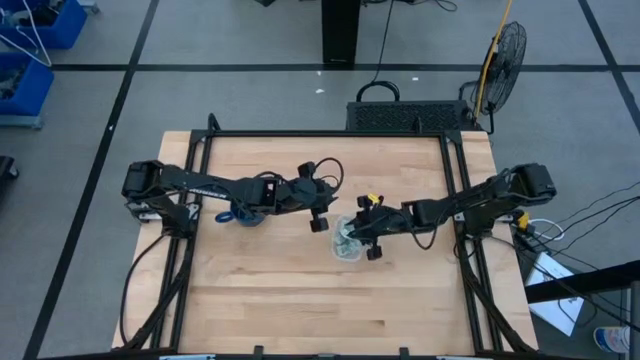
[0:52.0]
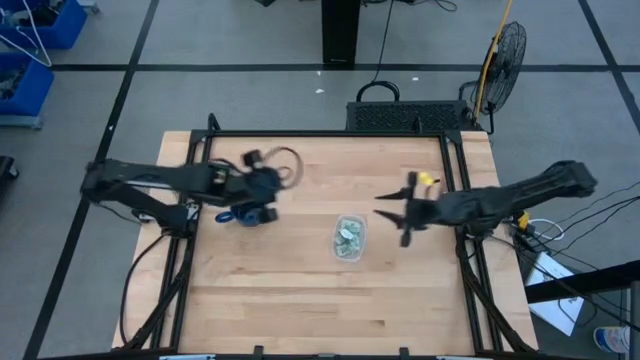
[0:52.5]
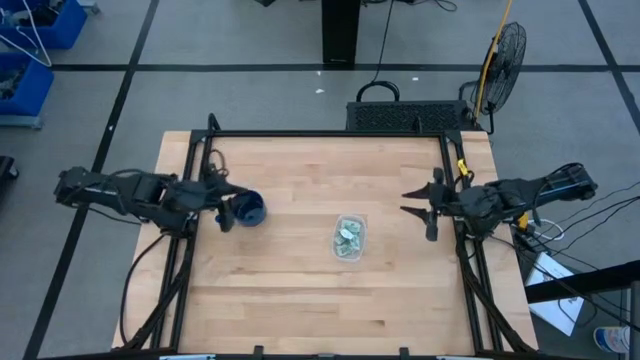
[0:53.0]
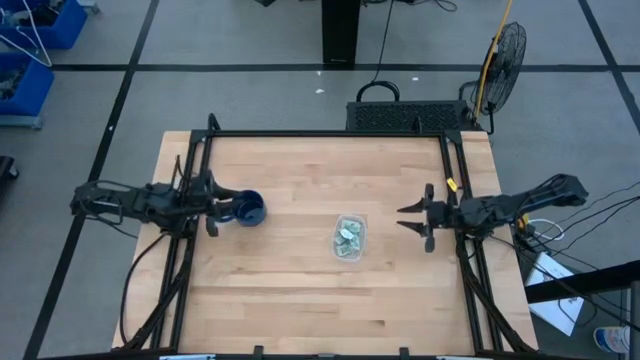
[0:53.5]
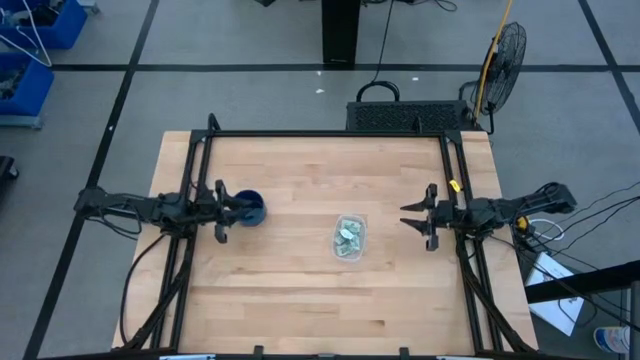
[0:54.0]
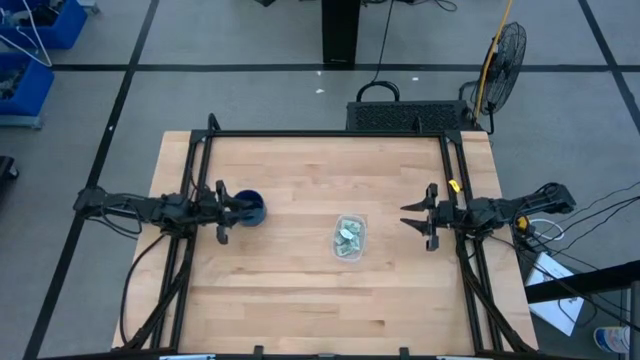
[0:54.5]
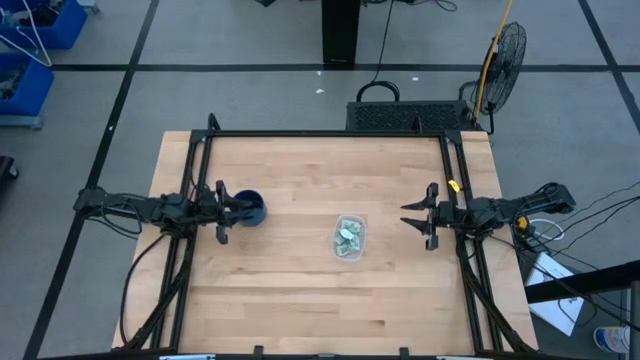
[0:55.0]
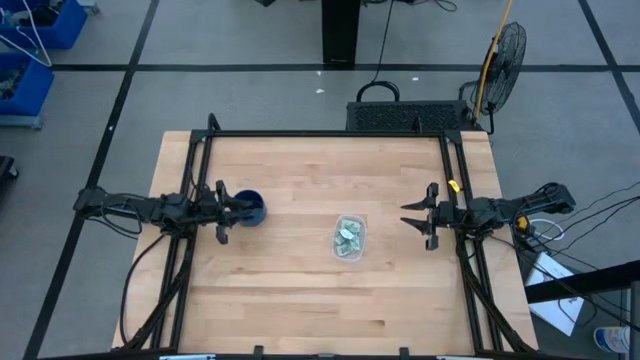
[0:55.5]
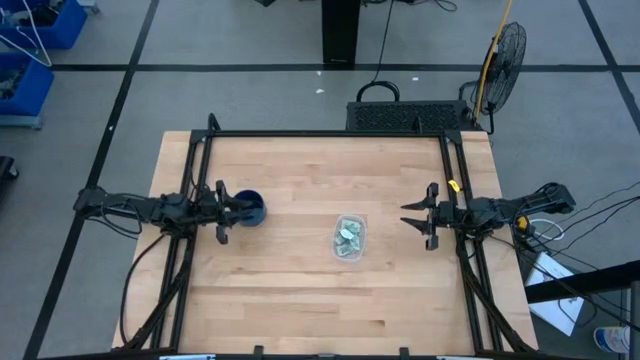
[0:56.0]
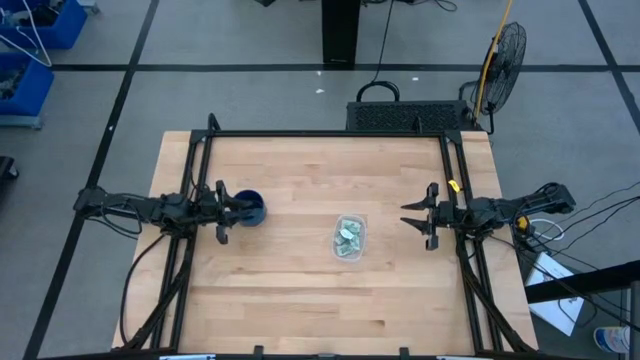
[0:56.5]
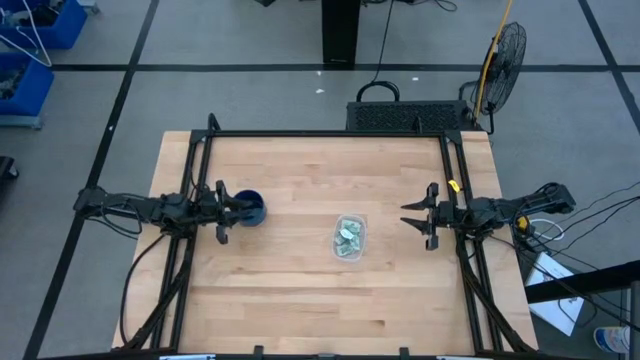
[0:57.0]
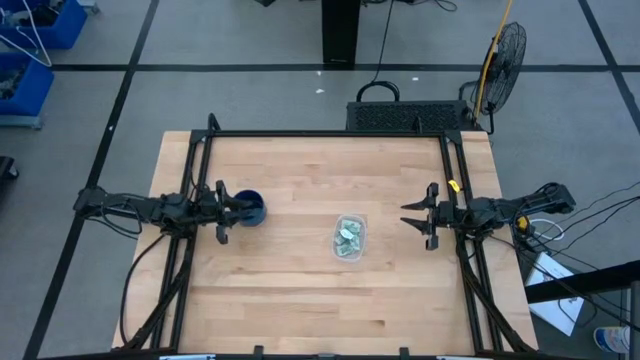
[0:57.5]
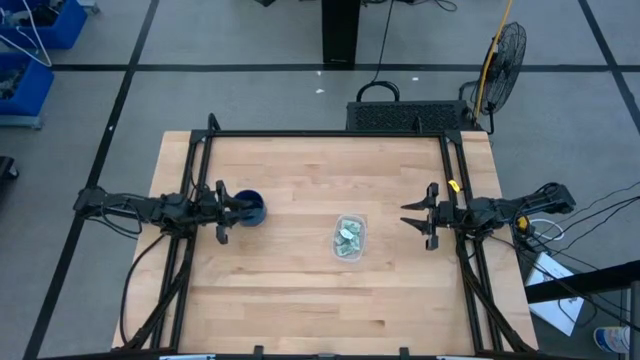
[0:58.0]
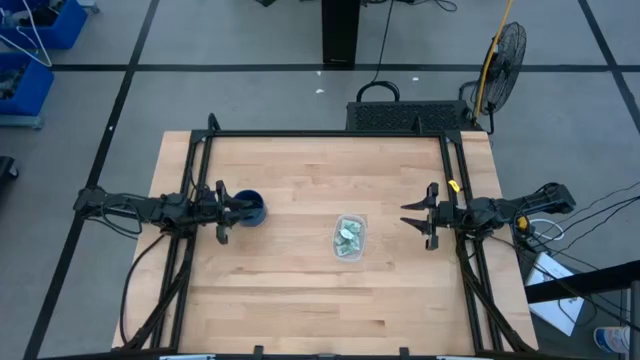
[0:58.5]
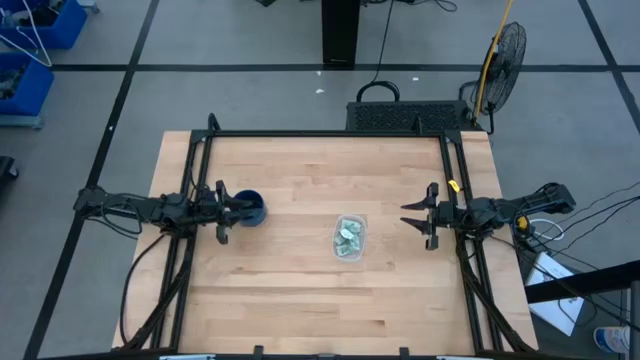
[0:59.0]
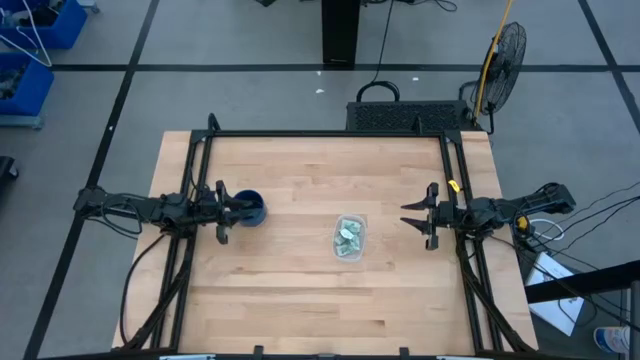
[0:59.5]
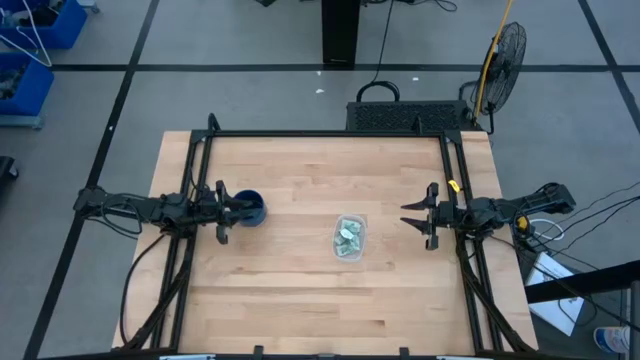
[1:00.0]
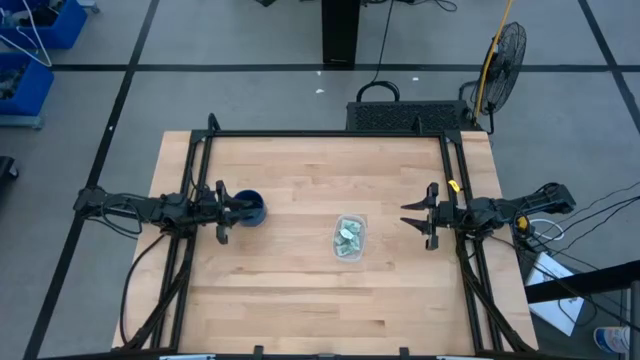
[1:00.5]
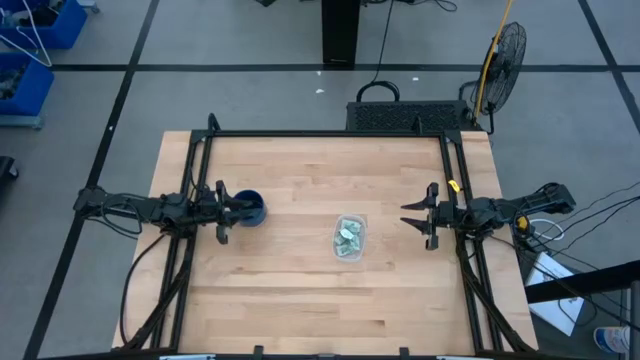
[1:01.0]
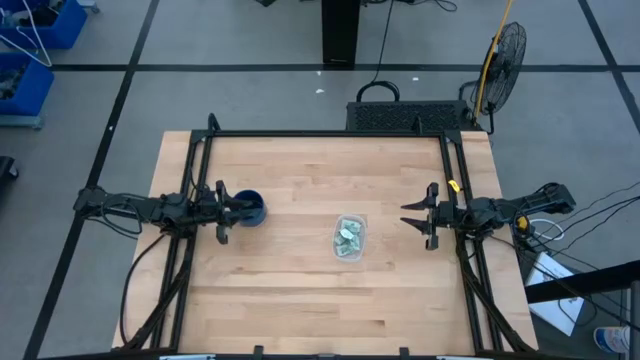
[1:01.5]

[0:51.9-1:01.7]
Task: Pick and place Stevia / Truvia into bins
Return to Home Position

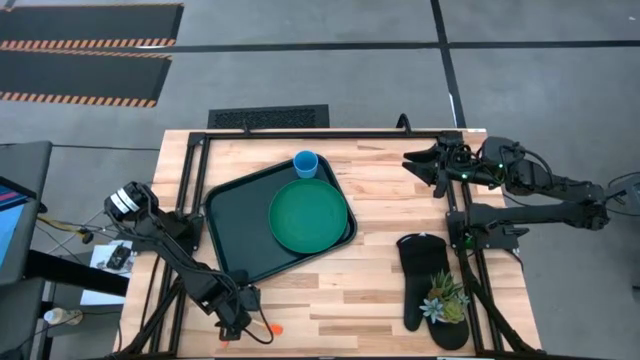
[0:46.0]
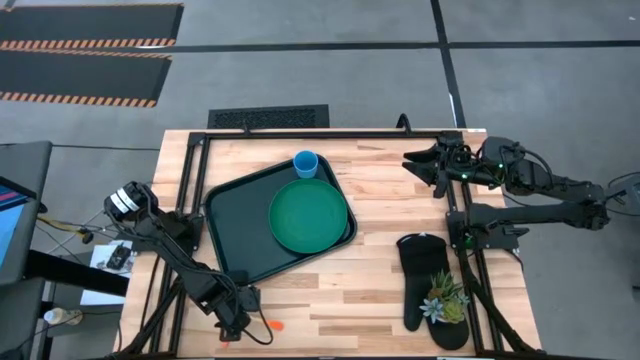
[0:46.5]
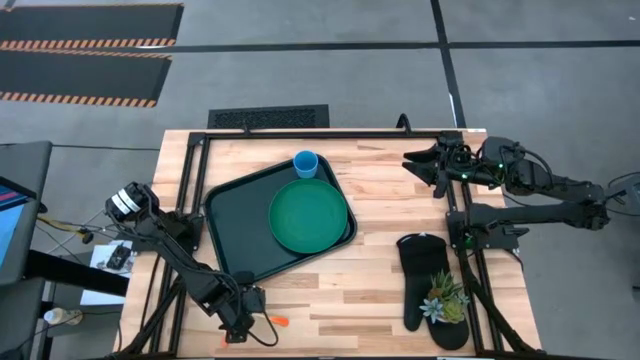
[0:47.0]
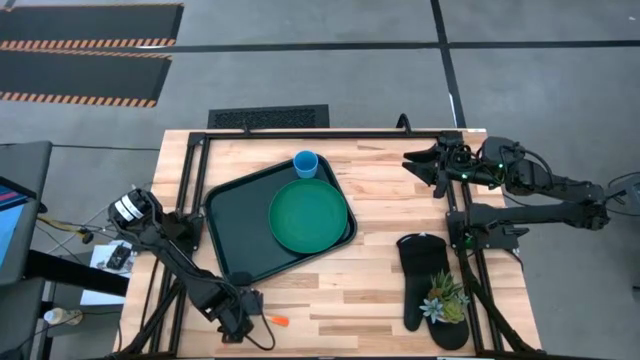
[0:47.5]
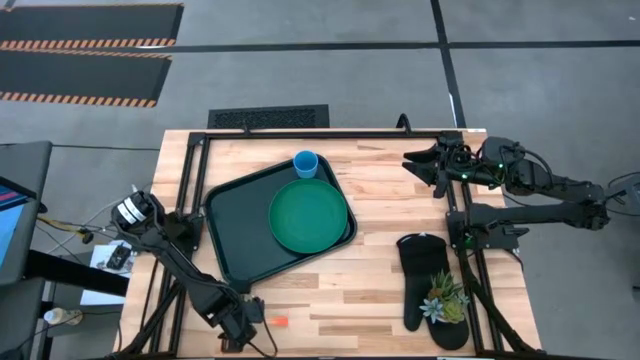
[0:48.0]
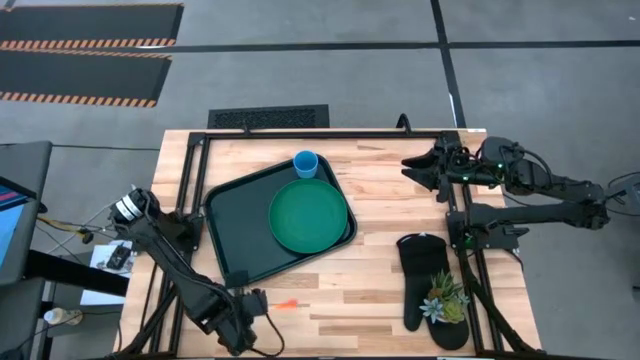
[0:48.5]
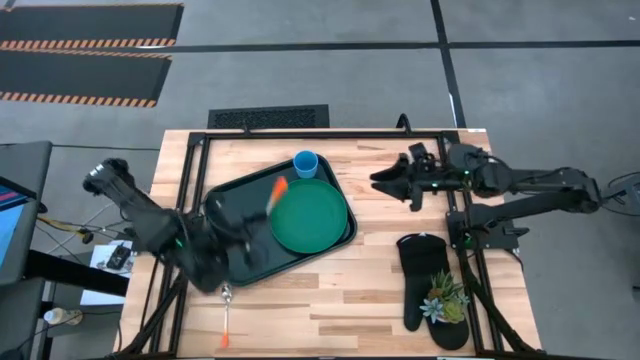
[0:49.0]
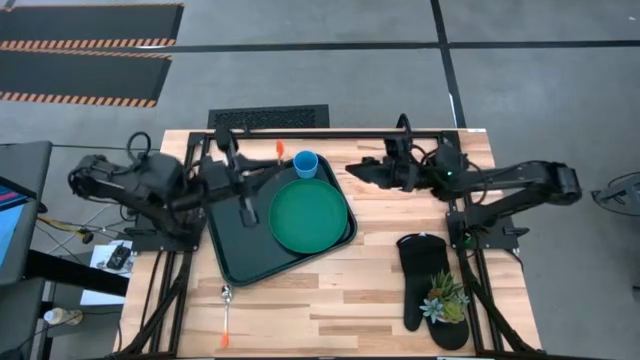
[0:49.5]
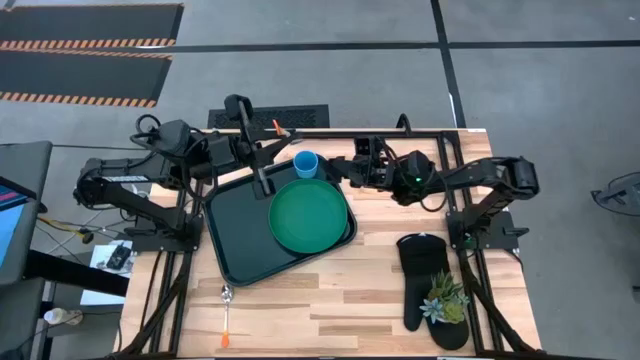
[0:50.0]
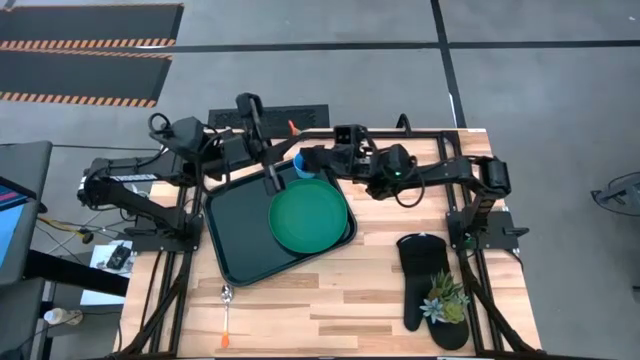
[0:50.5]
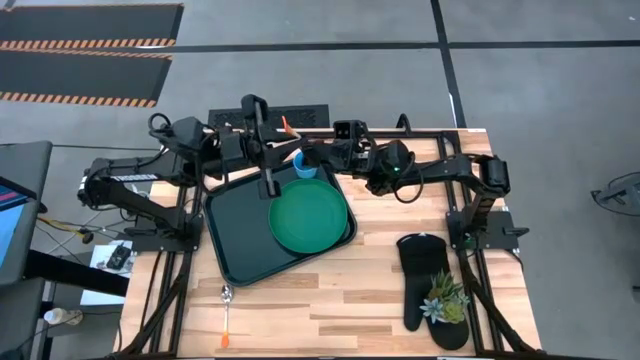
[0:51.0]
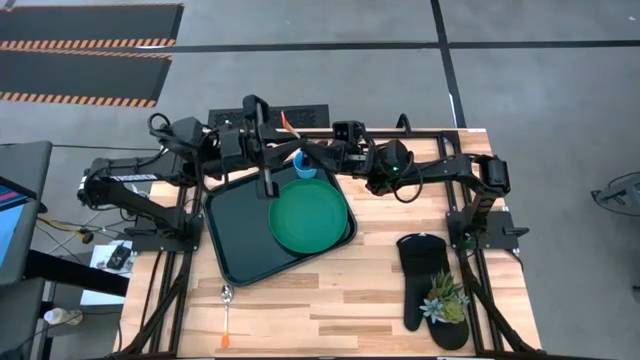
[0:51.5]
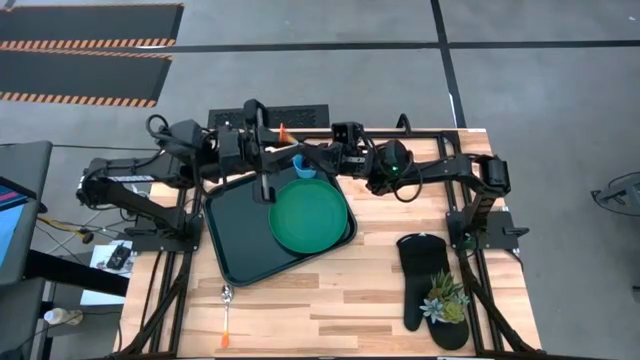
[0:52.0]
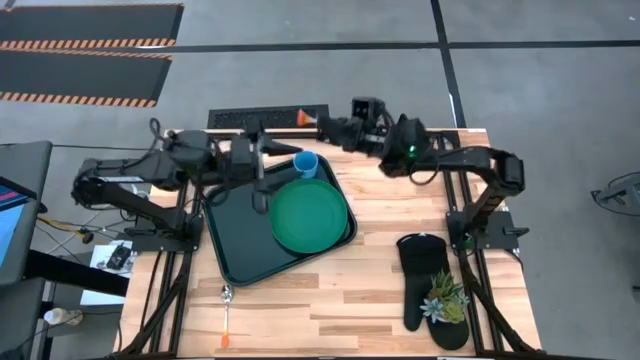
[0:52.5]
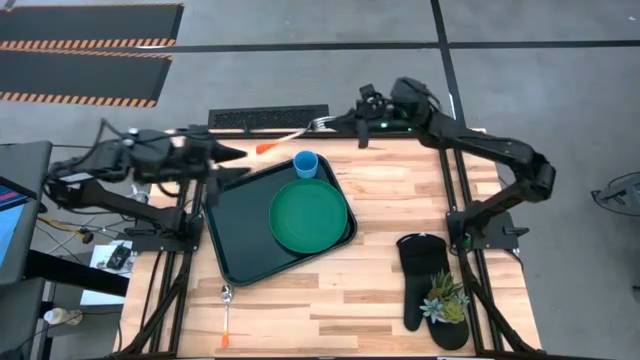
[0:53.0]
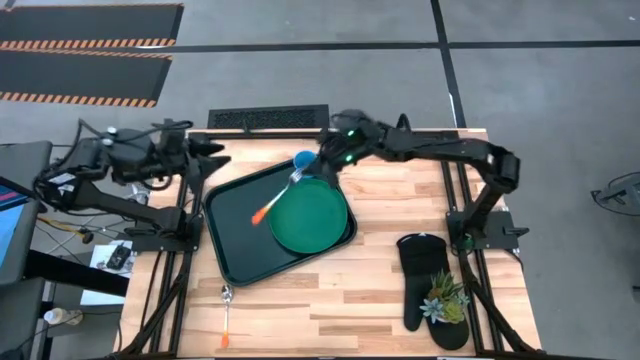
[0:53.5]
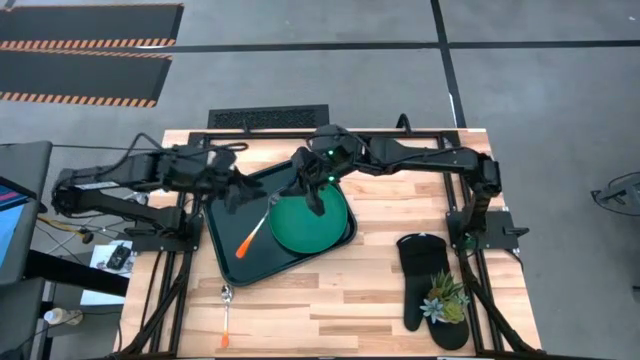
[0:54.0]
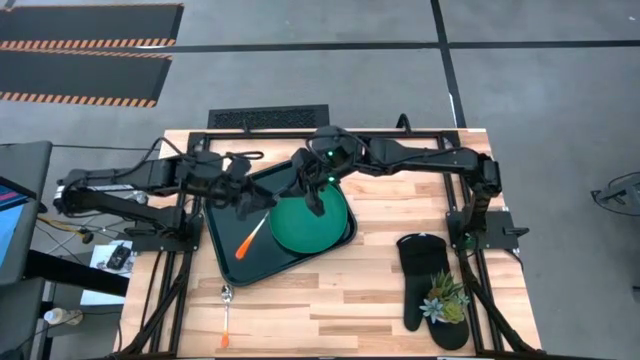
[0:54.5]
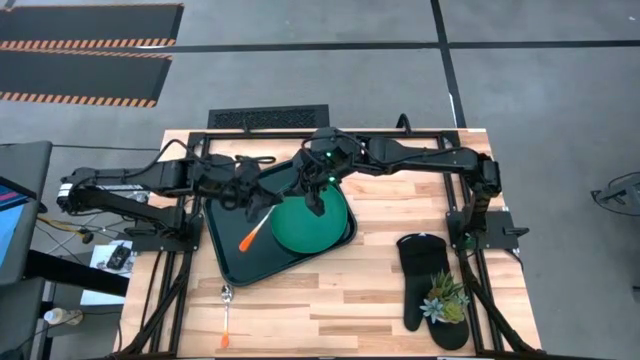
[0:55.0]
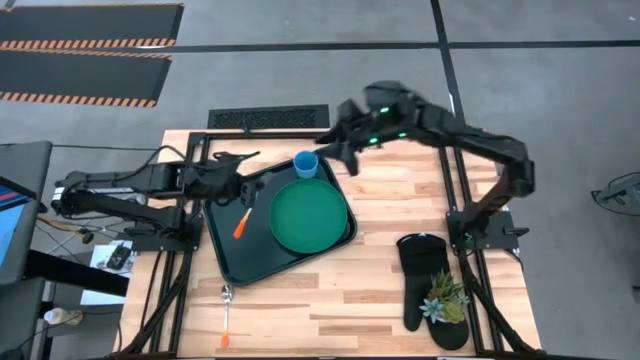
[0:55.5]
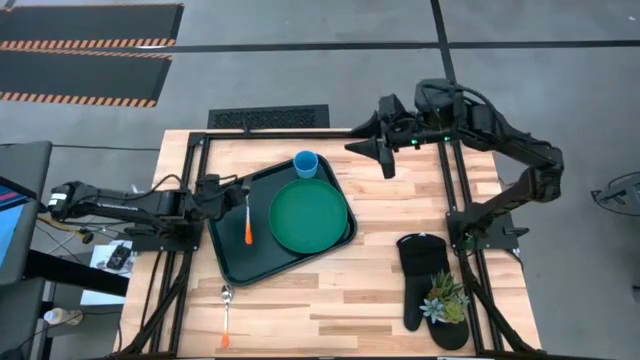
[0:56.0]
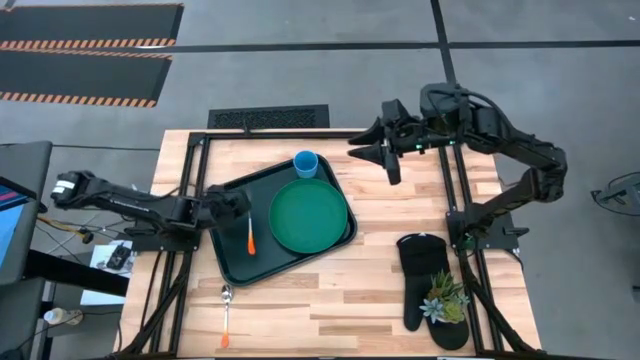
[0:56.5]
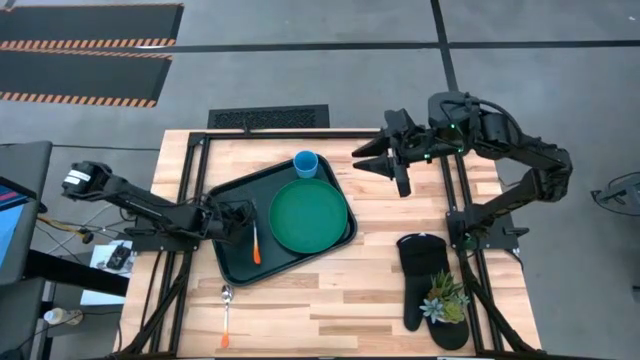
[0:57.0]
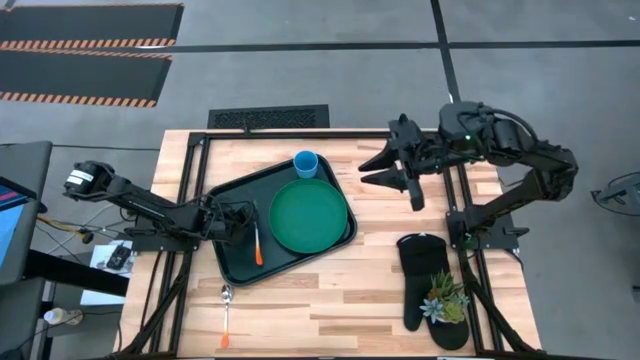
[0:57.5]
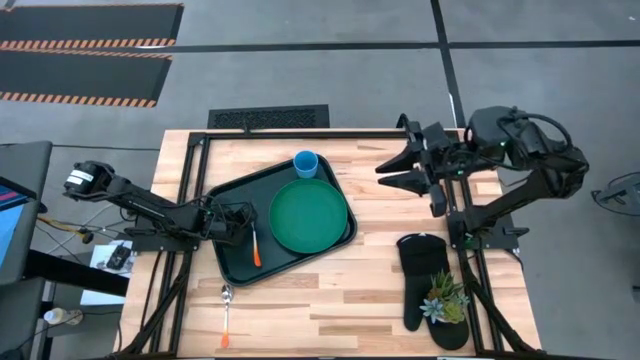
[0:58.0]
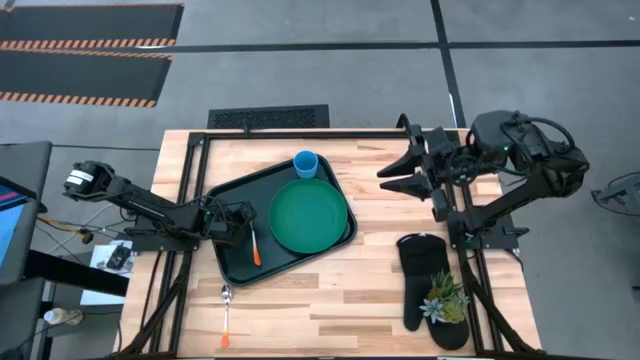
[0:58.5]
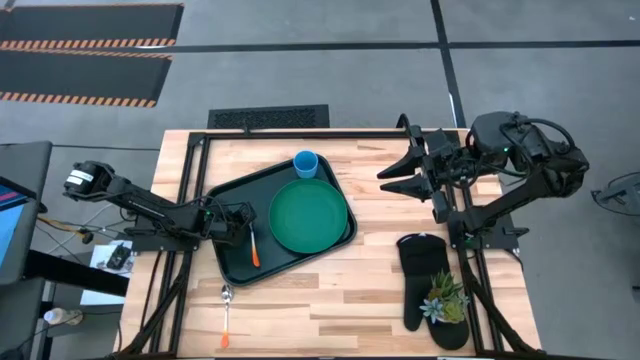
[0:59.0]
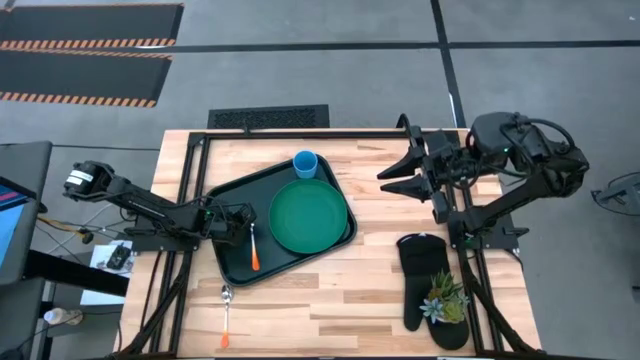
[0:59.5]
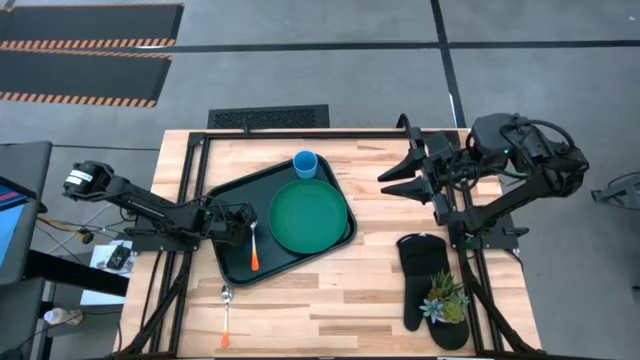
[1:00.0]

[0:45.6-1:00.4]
Task: Pick and place plate/cup/fork/spoon on tray
Put the orange fork on the black tray to the left of the green plate
